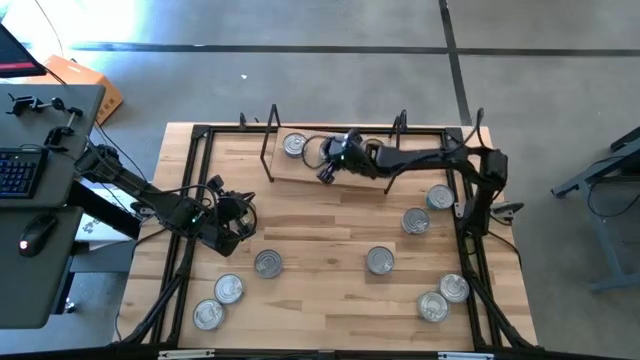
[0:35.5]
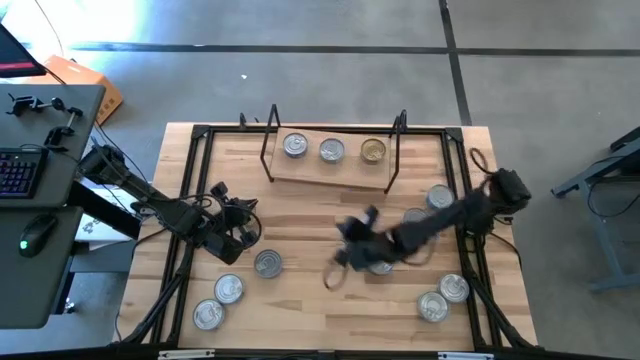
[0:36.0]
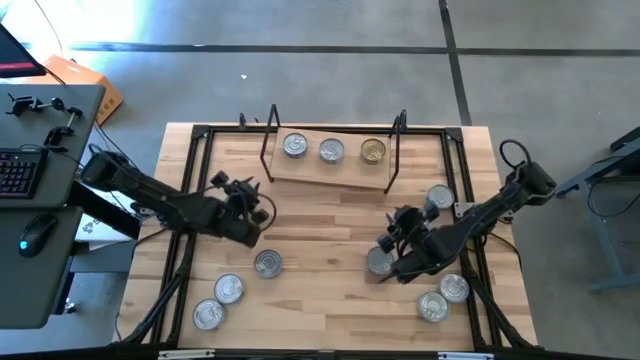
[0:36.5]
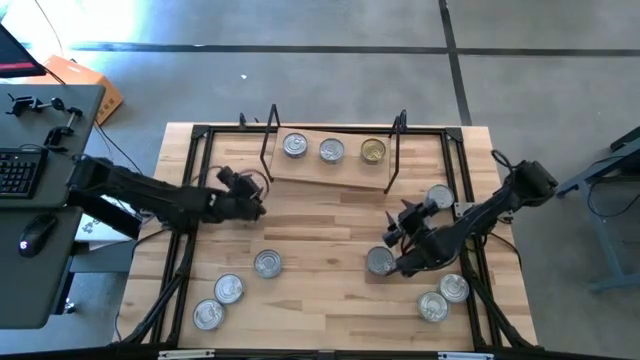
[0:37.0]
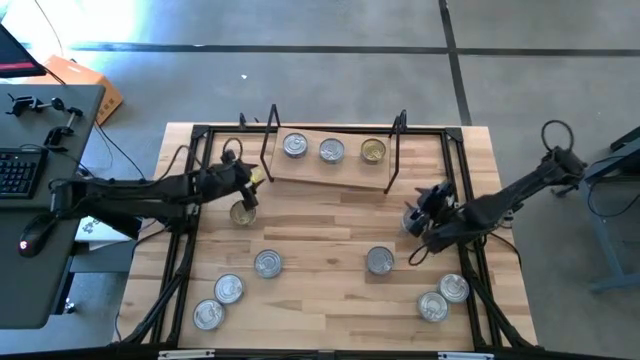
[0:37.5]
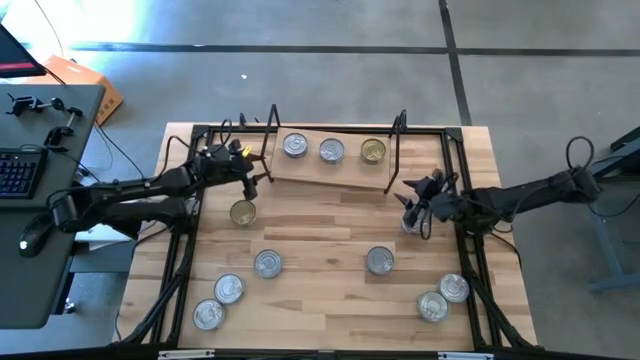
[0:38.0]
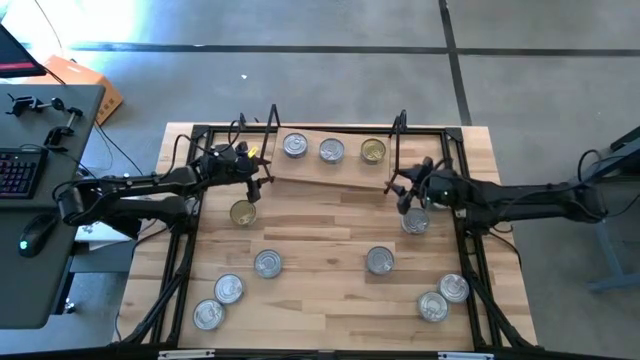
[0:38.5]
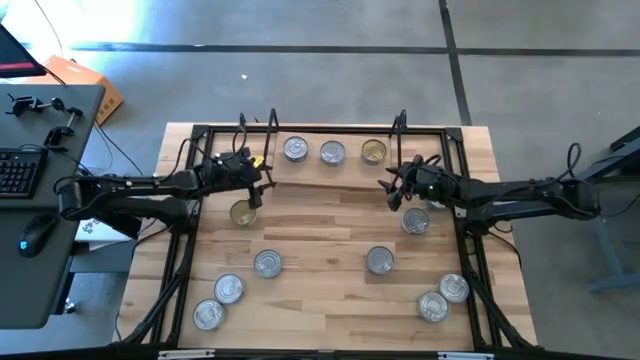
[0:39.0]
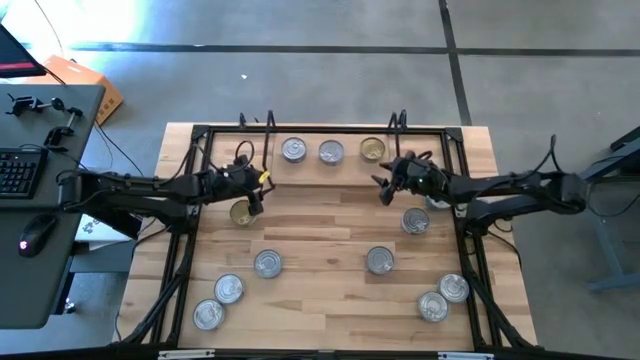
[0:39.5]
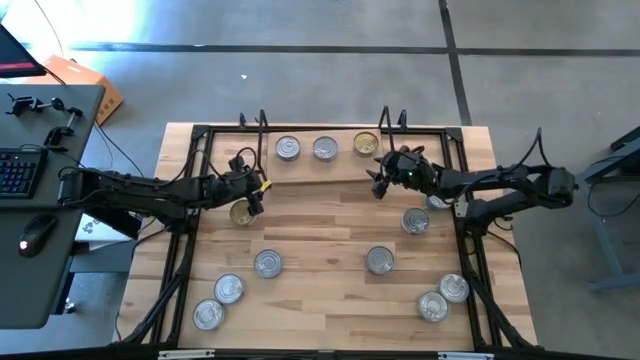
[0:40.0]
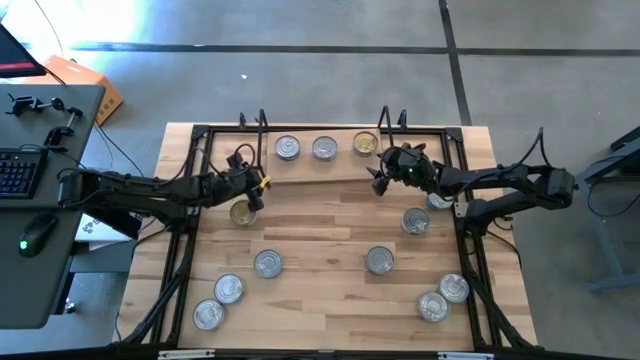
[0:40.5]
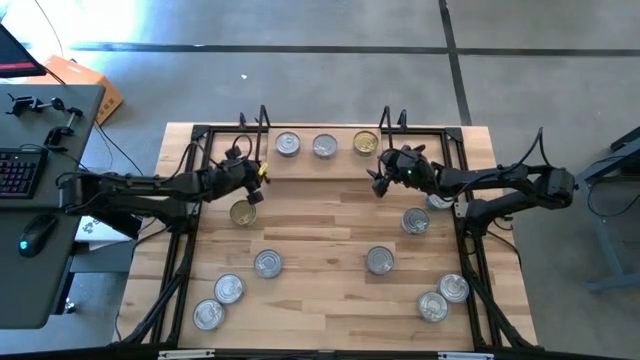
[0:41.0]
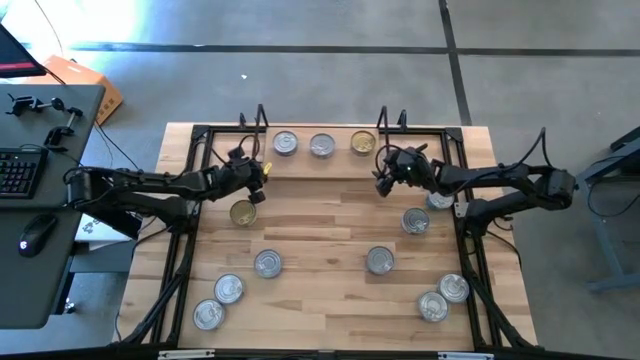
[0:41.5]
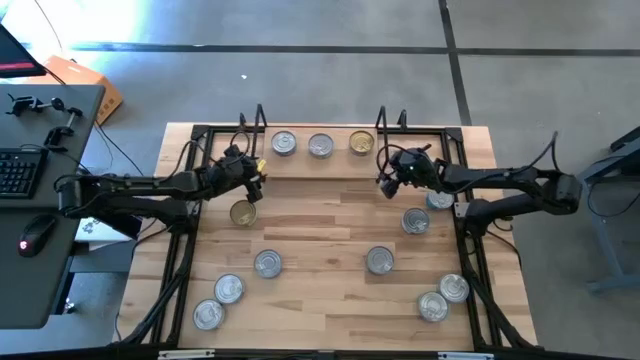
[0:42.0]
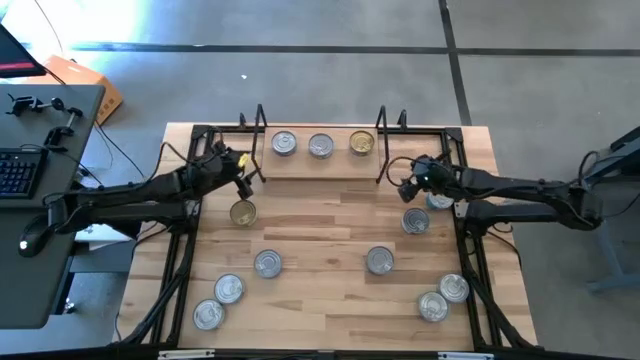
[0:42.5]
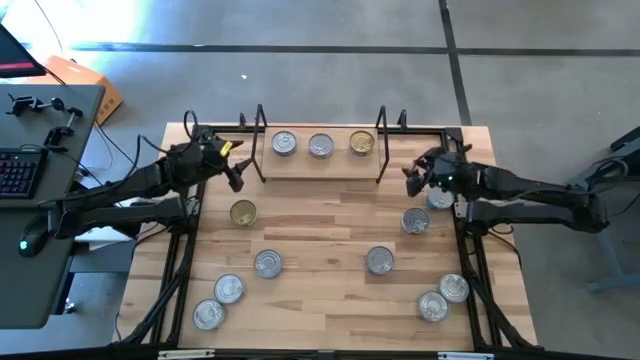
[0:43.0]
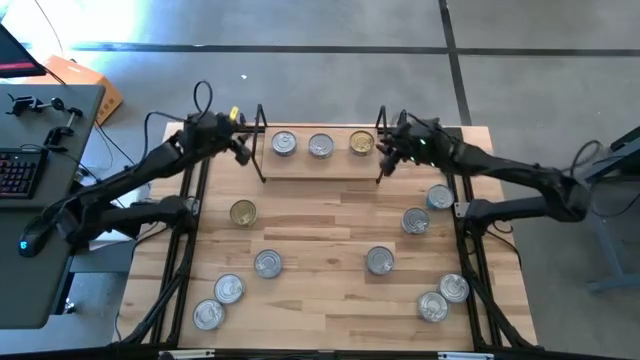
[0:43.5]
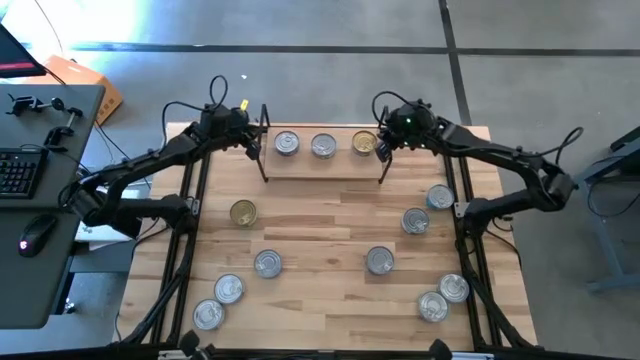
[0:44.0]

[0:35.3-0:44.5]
Task: Stack canned seafood by type on shelf
Adjust the shelf on the table

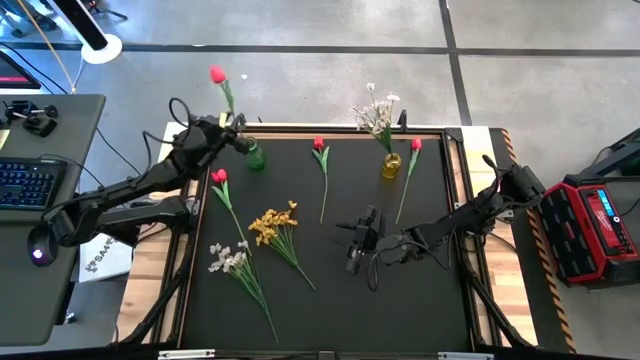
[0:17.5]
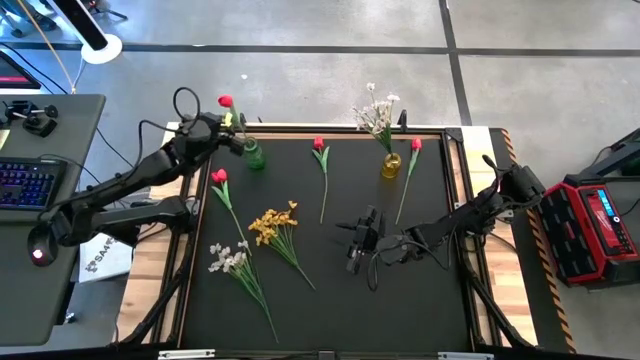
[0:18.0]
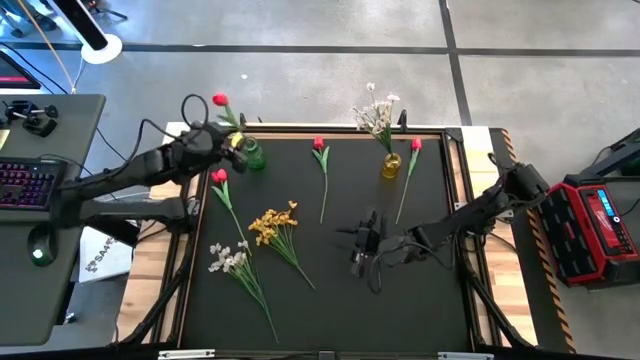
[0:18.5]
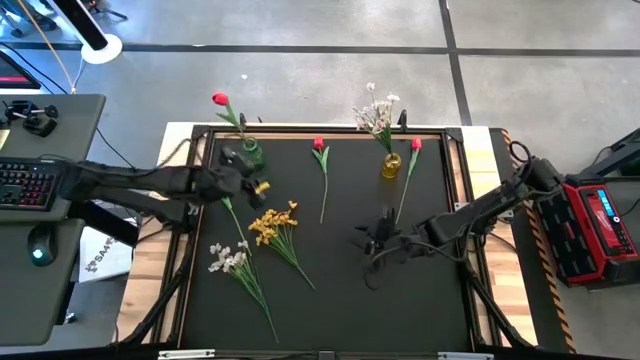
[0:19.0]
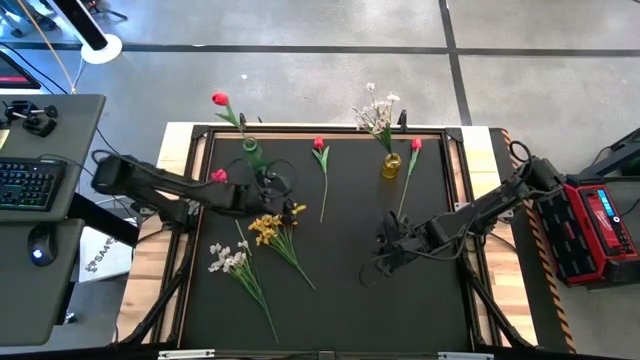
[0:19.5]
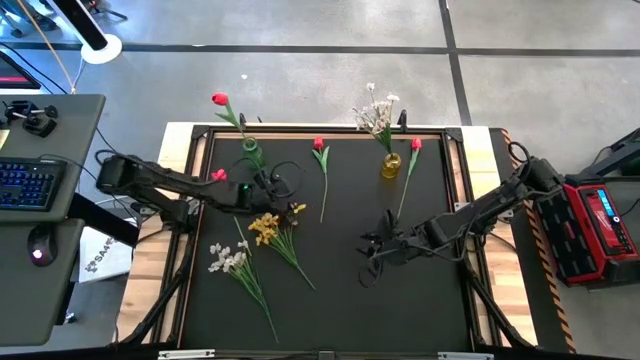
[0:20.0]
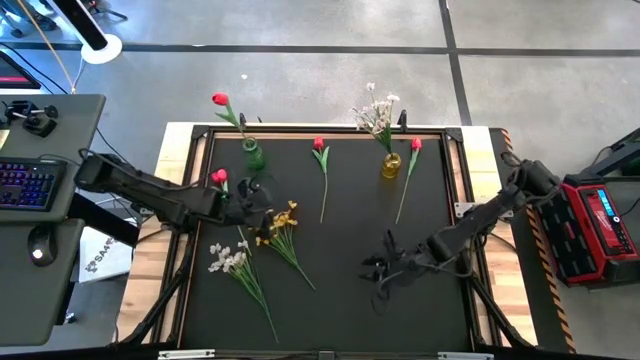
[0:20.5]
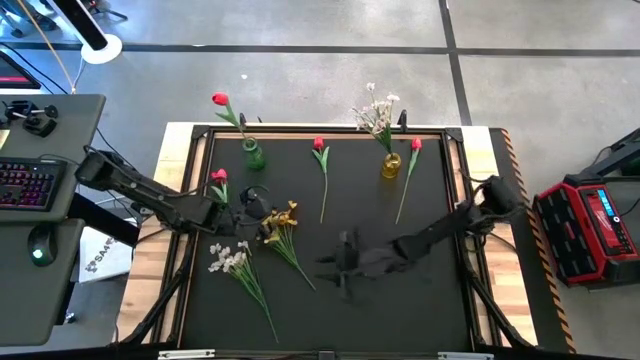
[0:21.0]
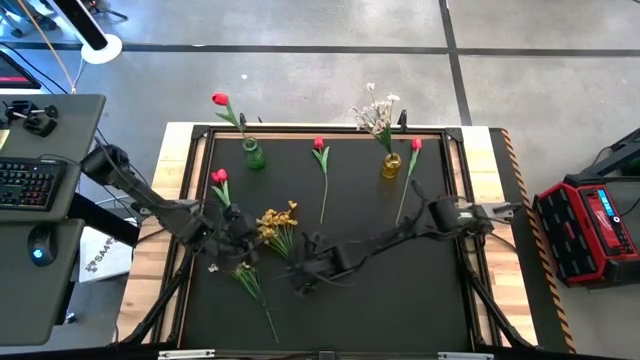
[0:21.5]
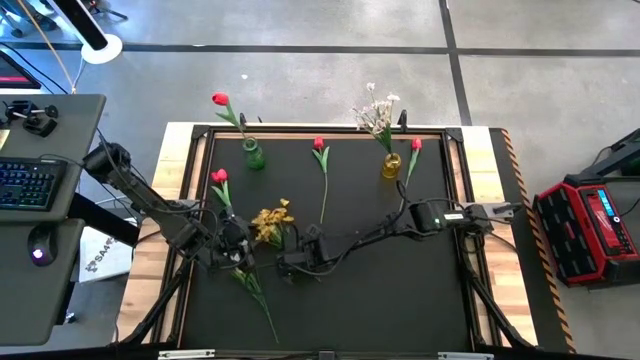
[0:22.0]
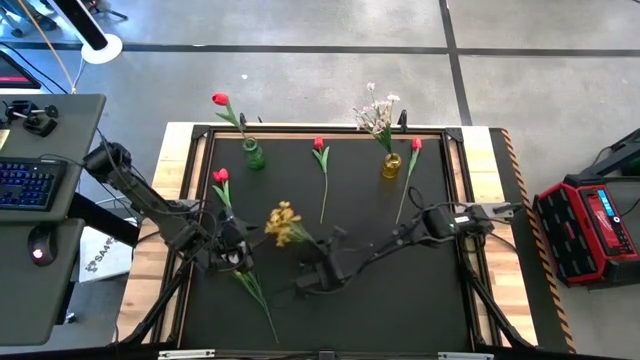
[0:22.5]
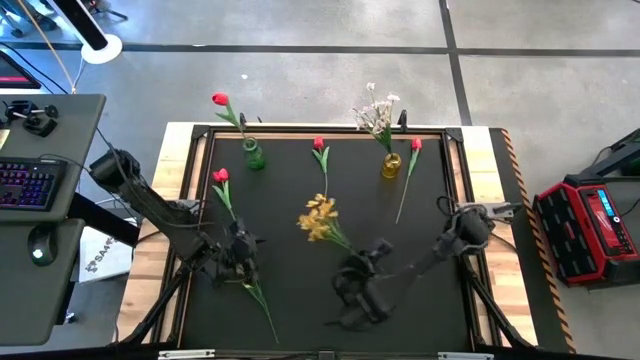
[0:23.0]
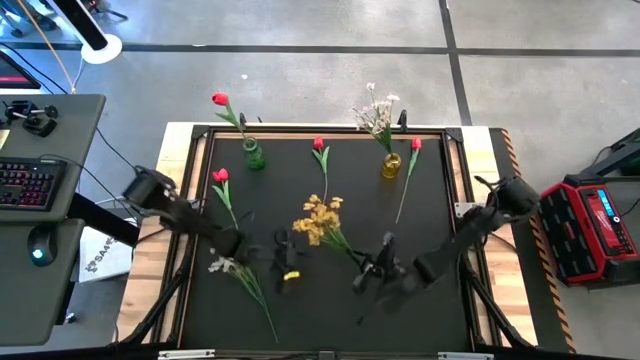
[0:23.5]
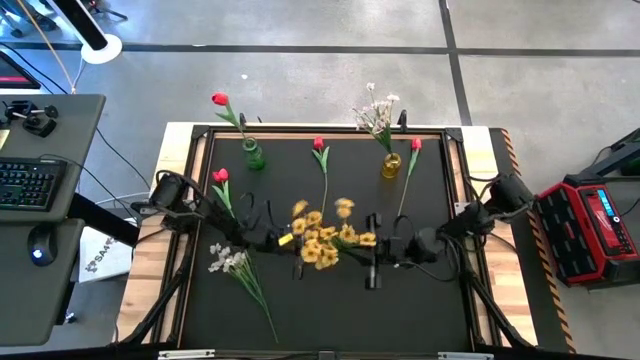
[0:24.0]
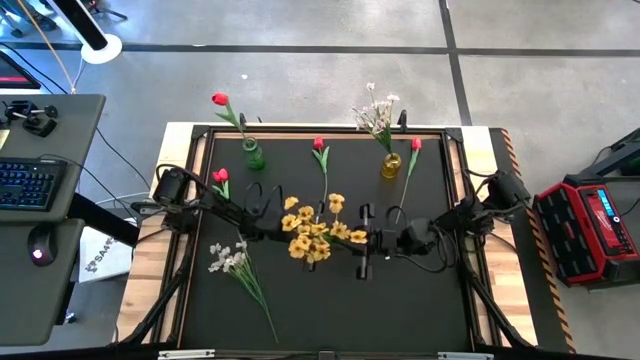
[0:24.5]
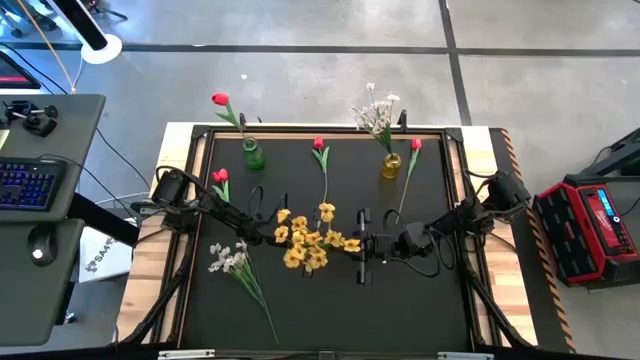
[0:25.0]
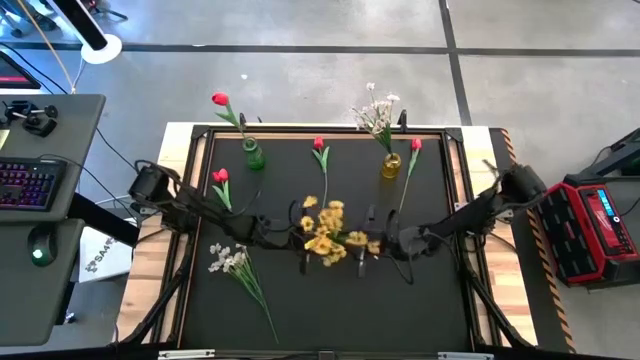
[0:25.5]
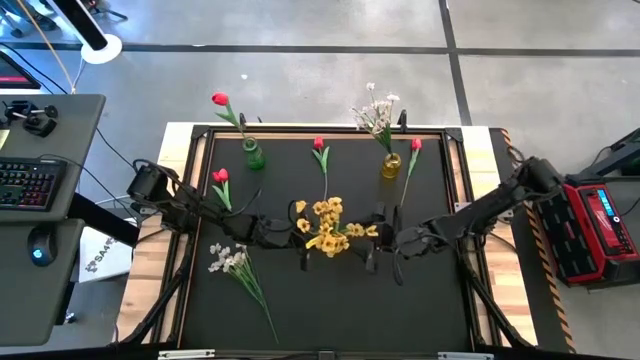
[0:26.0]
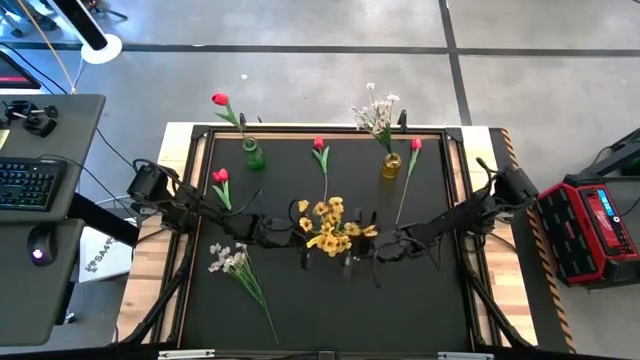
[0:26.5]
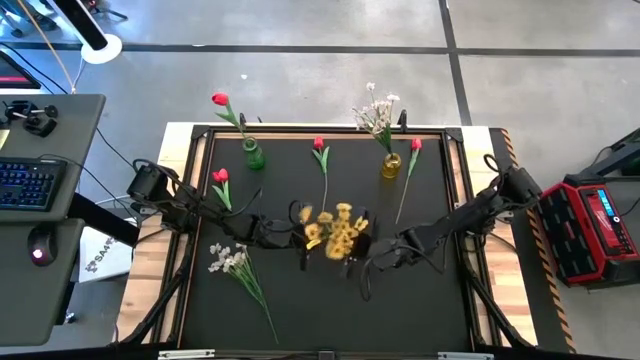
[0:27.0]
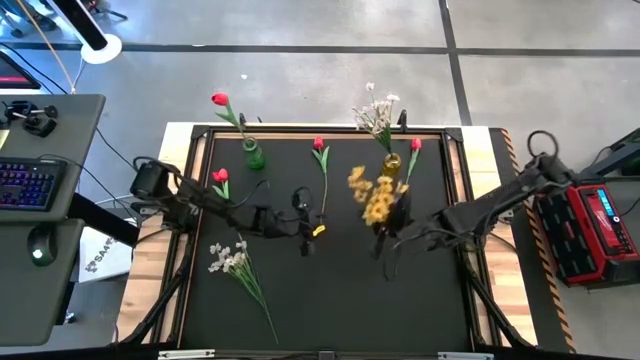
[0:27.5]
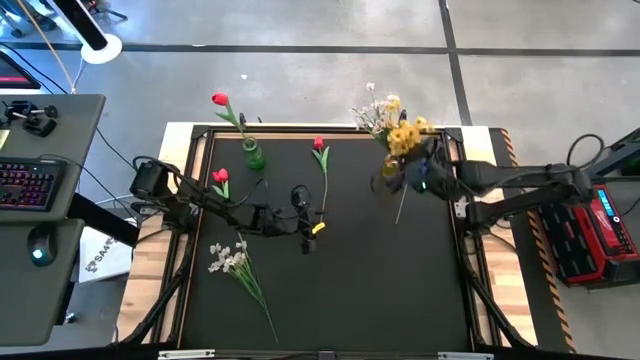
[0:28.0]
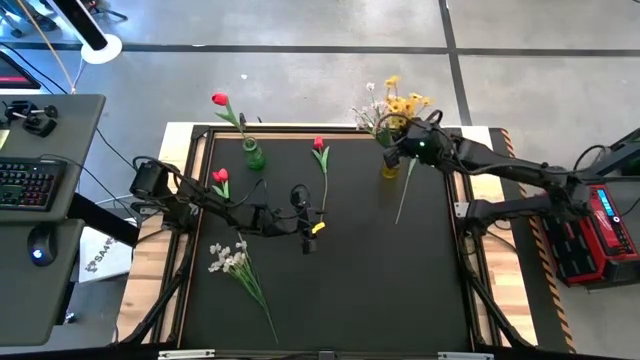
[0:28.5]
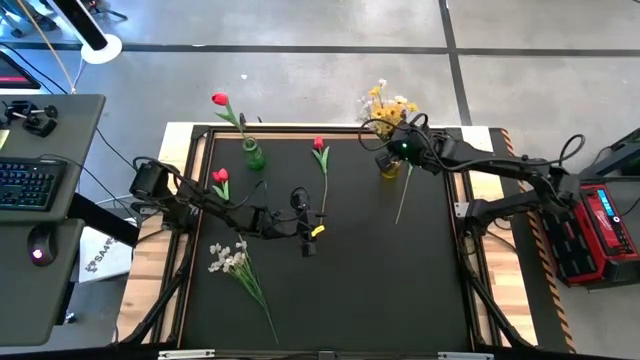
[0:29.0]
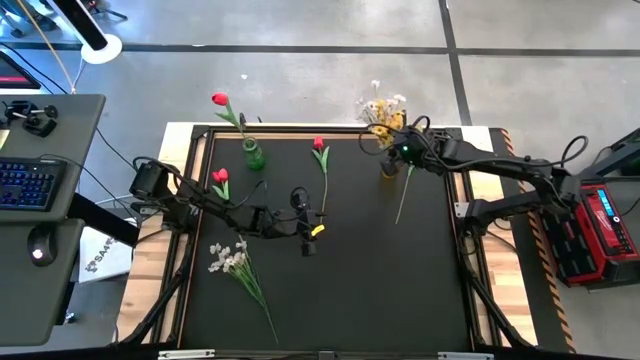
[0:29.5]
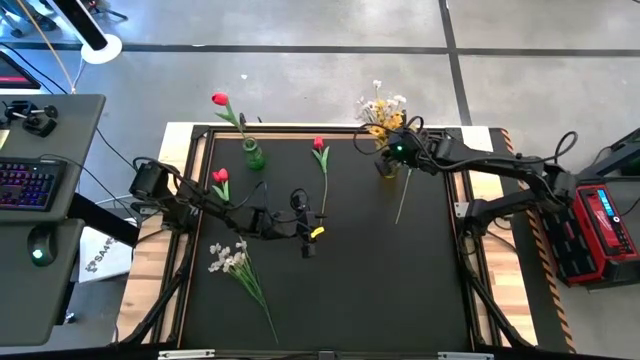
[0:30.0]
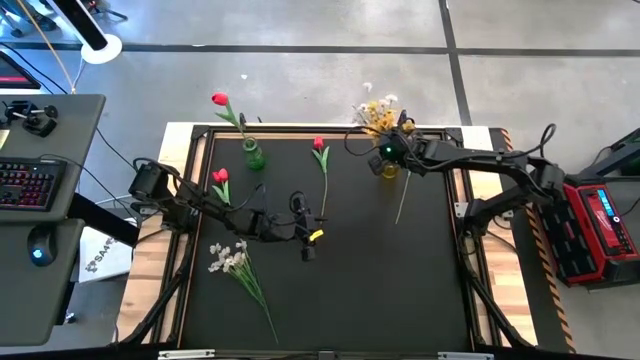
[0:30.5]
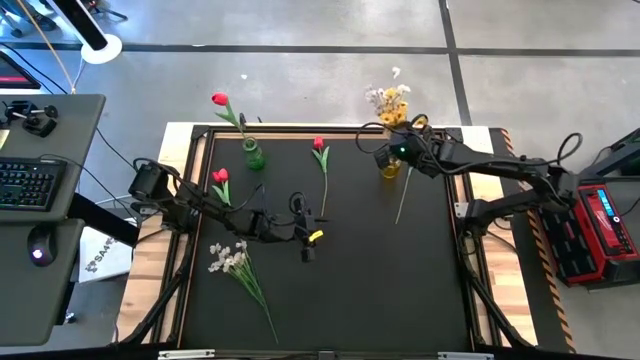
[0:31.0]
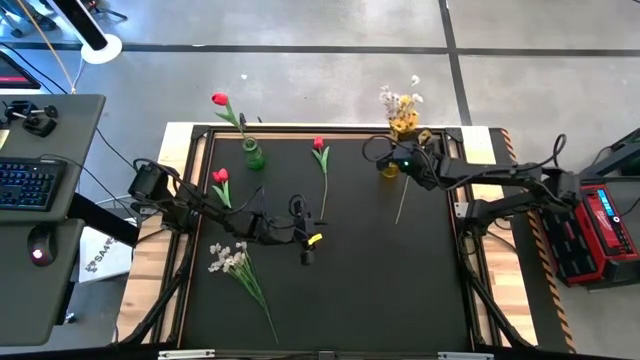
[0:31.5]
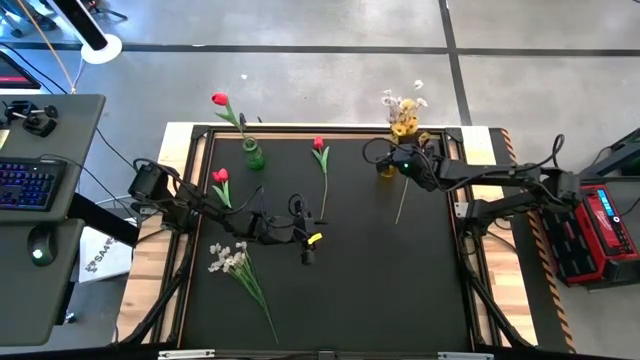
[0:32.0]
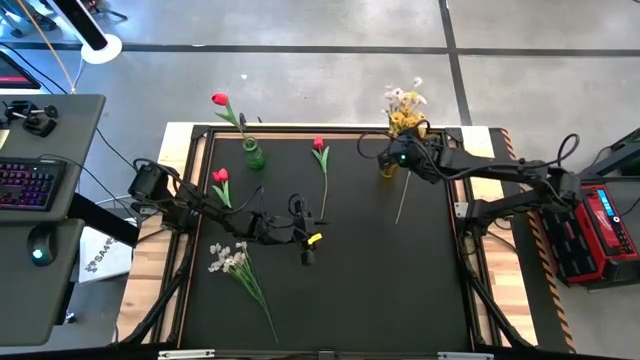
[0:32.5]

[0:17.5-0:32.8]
Task: Sort flowers into vase by color
Put the yellow flowers into the yellow flower vase
